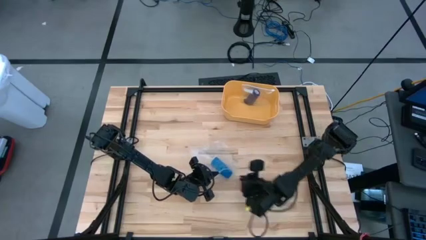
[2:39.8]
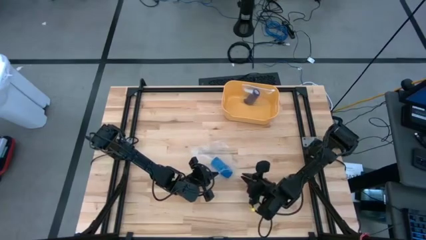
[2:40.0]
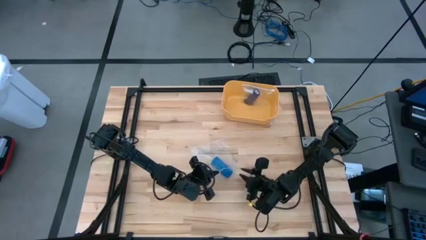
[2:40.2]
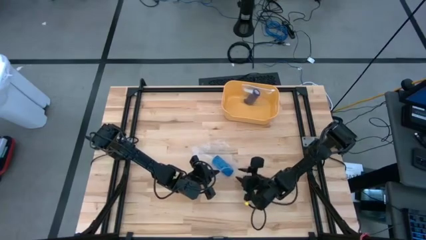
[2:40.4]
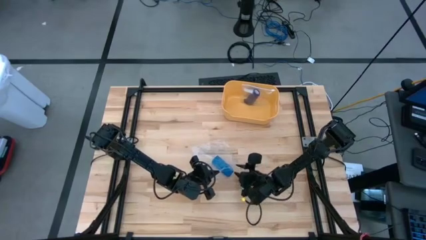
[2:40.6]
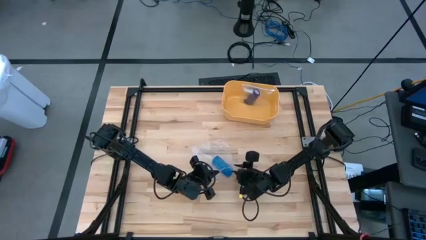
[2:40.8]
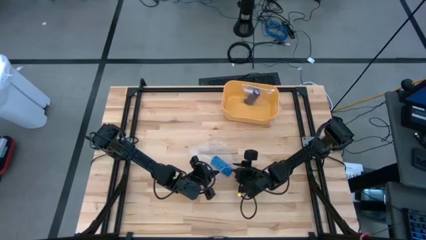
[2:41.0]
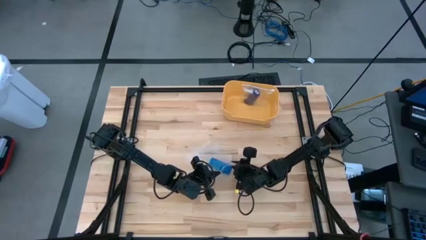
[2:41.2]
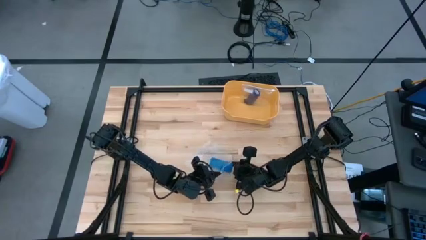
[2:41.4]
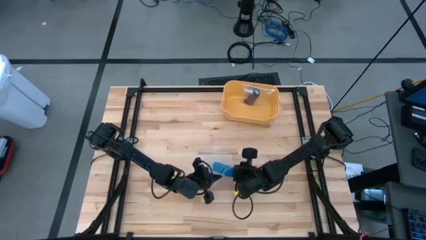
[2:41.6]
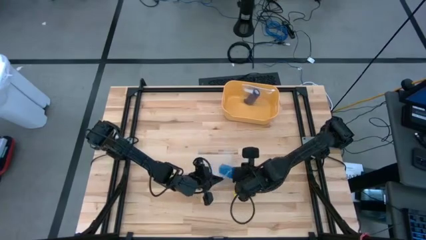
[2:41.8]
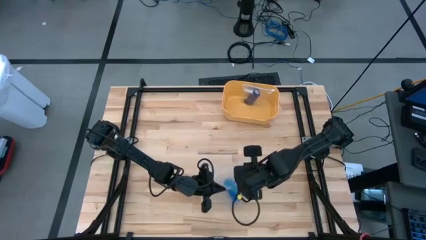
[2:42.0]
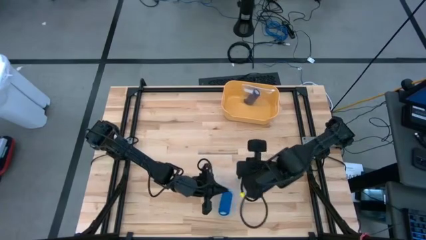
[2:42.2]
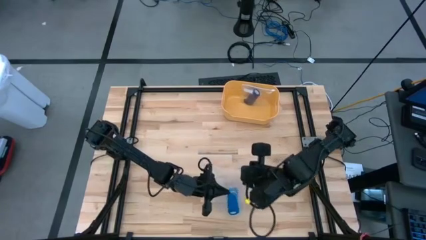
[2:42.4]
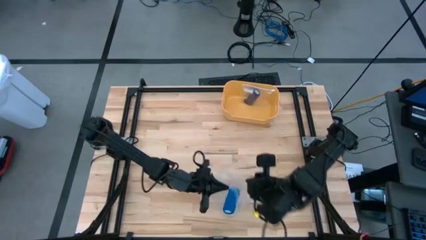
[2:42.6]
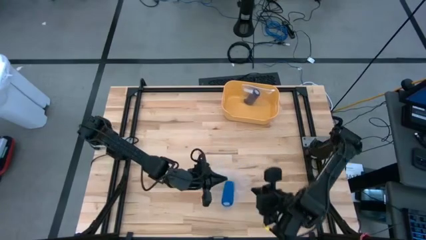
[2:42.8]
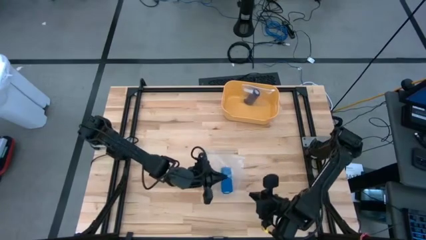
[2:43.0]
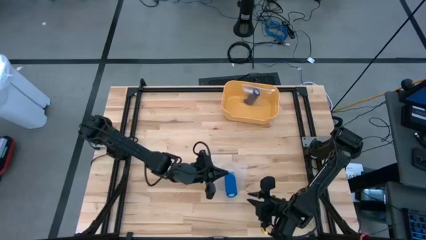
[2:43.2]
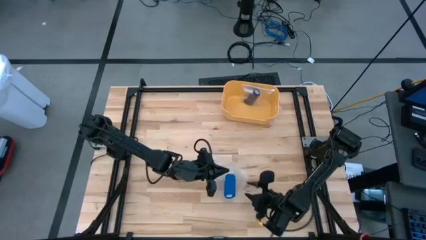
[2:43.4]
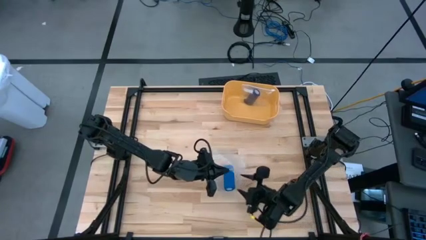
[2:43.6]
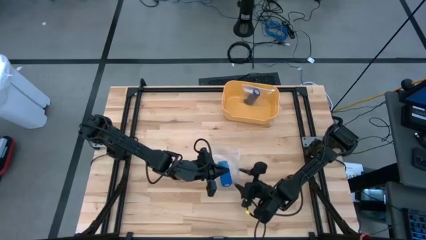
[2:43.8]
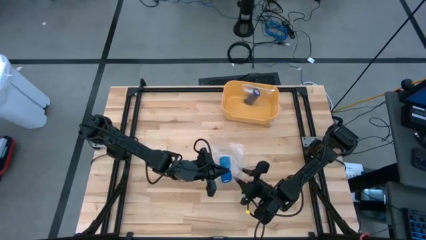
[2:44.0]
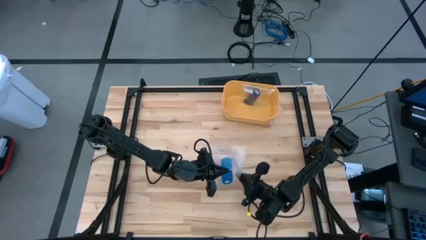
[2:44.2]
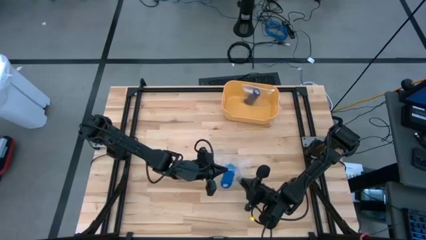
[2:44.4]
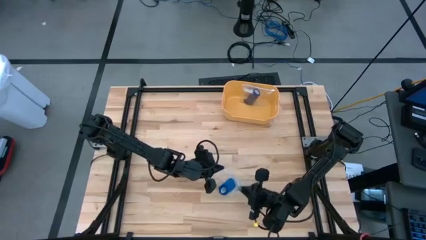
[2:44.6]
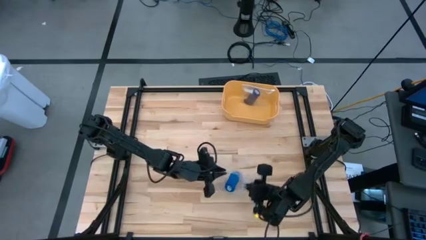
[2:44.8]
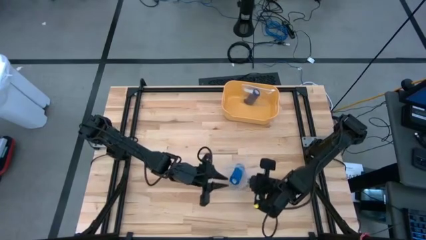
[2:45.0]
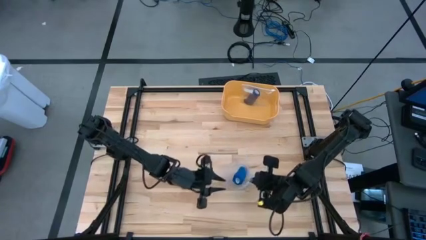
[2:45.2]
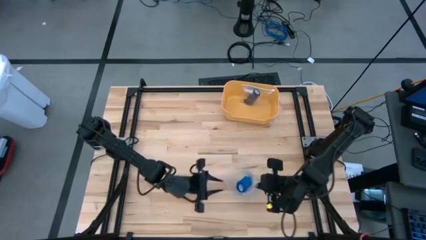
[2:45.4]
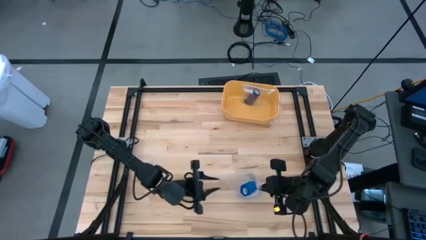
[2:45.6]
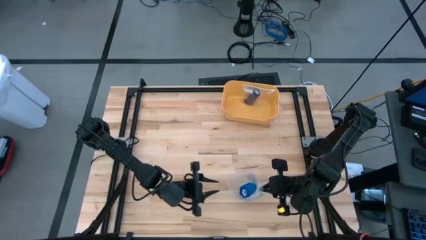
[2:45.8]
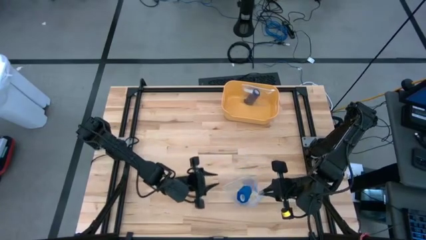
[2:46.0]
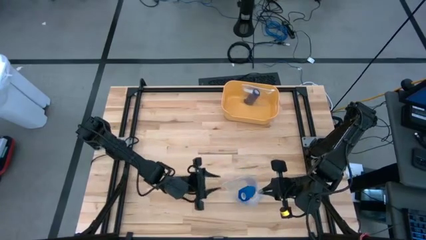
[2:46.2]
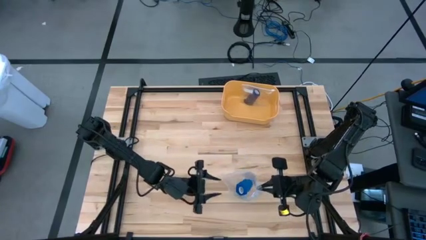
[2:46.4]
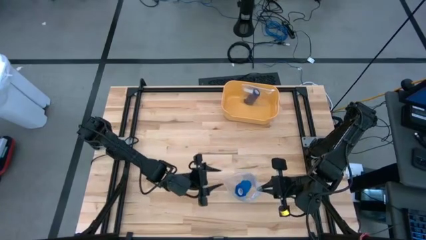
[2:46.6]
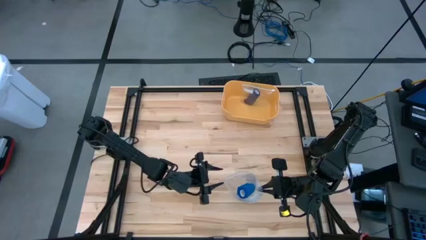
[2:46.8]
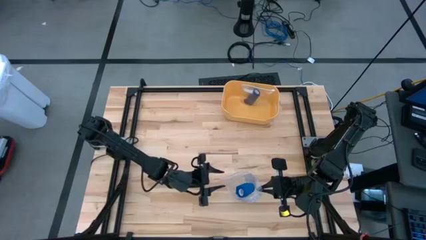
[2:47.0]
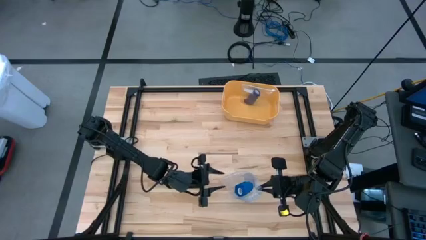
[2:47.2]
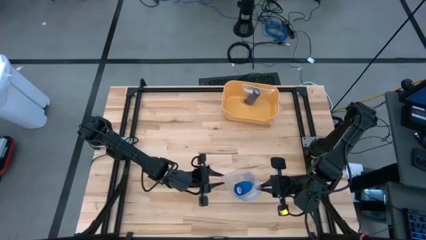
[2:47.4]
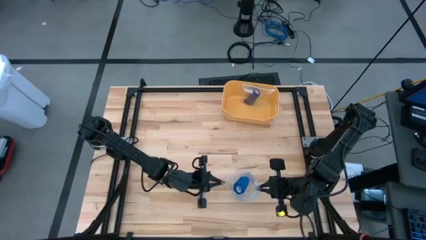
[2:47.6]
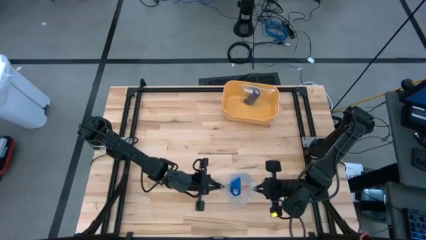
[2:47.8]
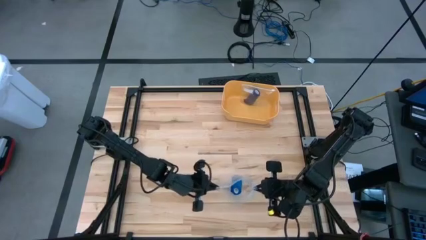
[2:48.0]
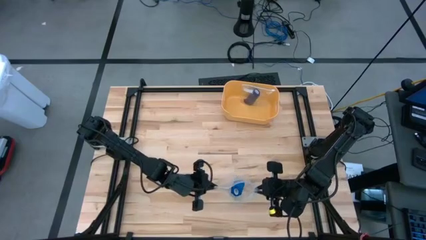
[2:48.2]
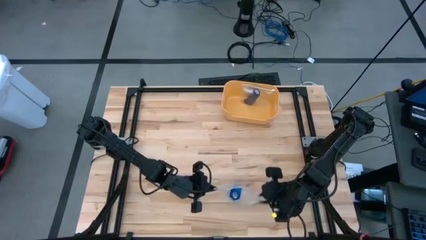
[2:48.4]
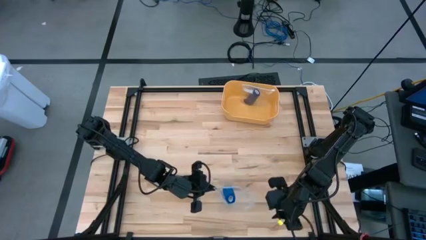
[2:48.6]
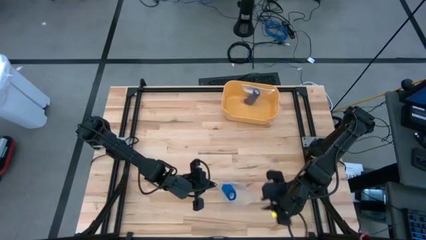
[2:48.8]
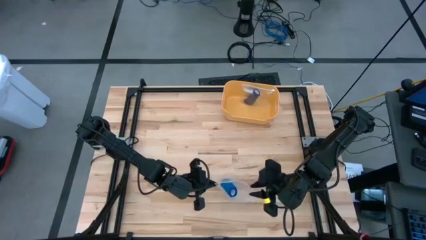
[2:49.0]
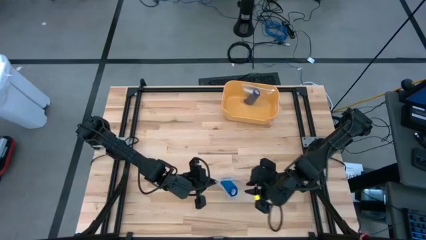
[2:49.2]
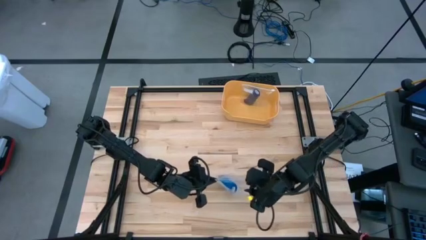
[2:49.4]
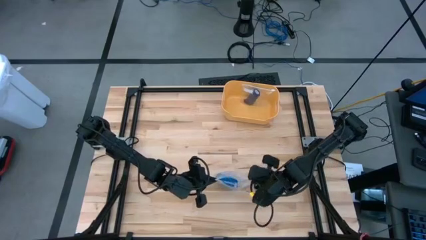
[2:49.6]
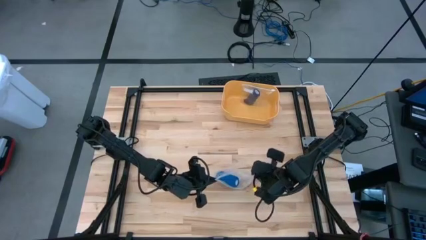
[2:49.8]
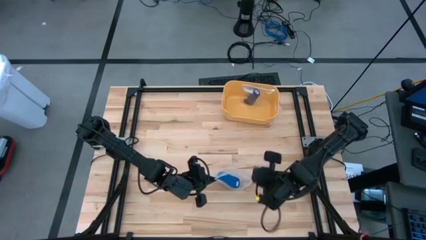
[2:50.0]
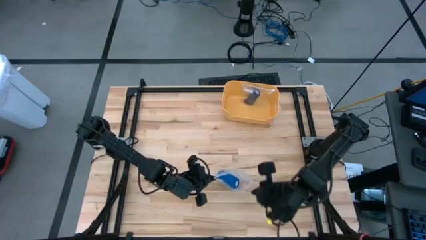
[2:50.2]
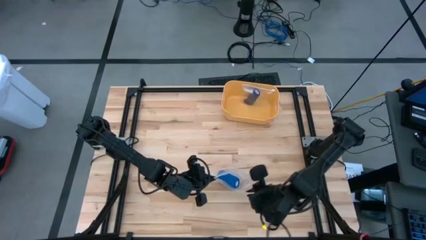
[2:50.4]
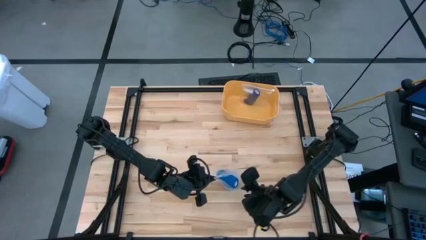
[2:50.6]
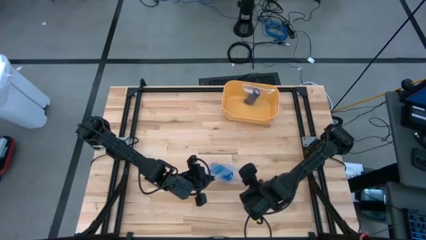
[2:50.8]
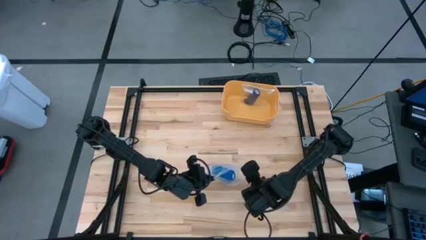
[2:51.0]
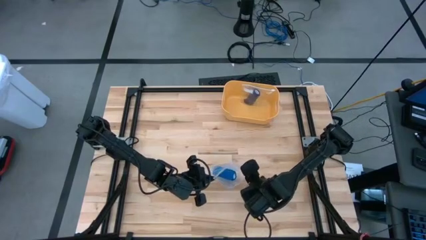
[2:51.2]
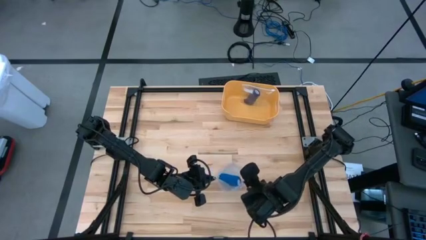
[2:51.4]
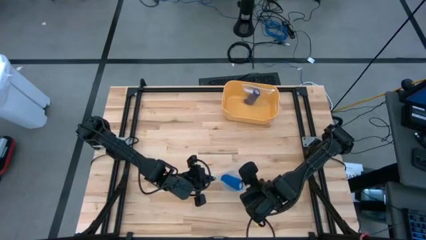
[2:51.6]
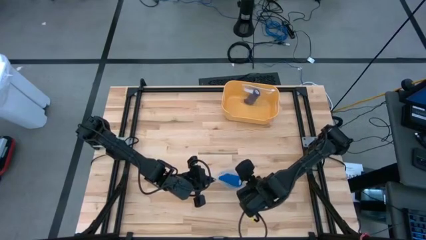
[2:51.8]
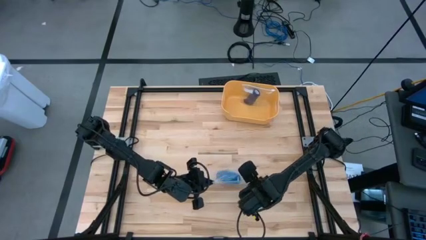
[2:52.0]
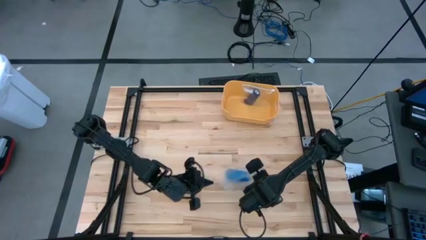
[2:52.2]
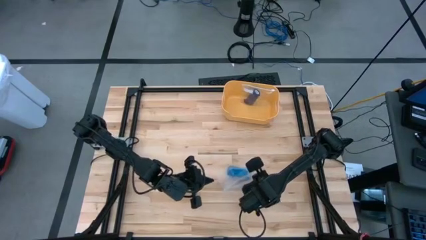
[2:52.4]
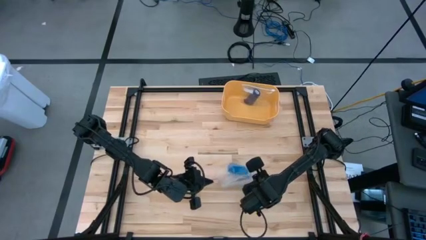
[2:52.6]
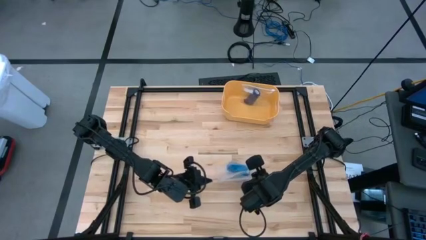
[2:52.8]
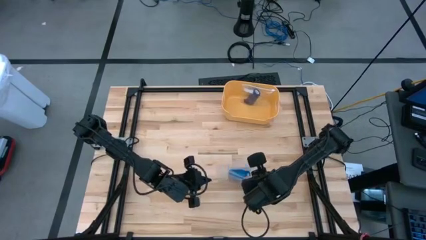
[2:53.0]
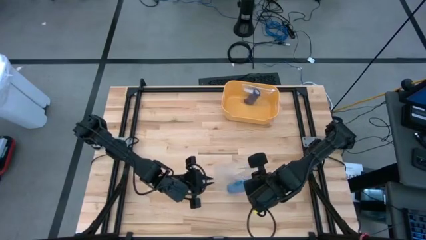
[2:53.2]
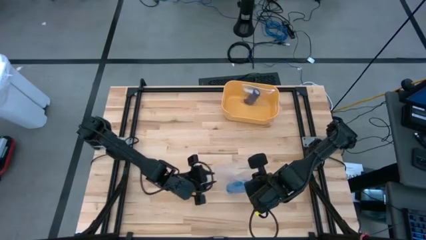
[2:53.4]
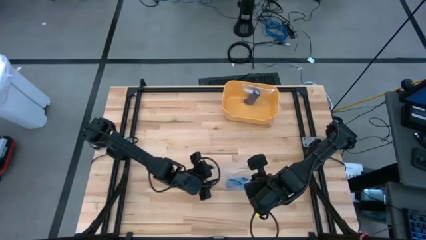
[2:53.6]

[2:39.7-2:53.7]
Task: Roll bandage
Close the transparent zip bag

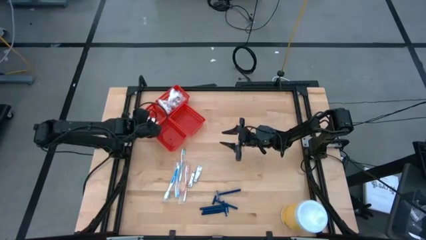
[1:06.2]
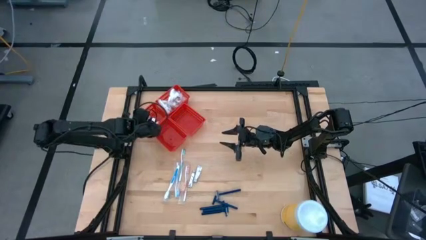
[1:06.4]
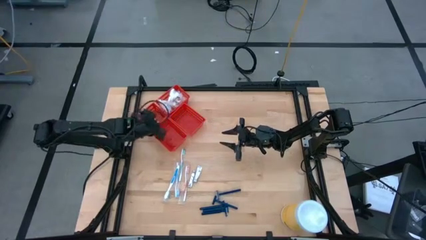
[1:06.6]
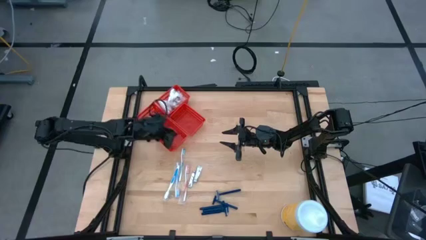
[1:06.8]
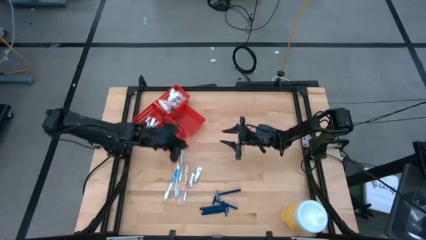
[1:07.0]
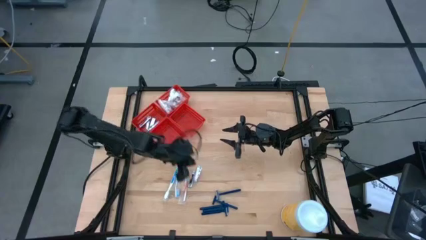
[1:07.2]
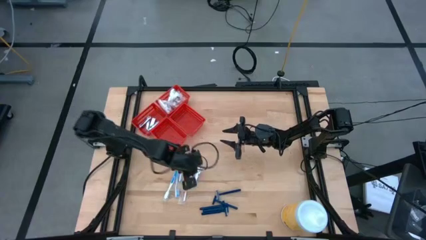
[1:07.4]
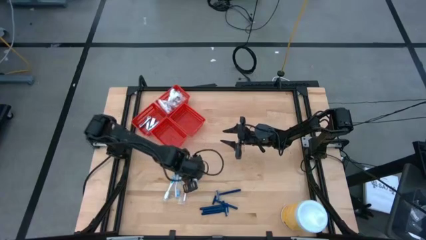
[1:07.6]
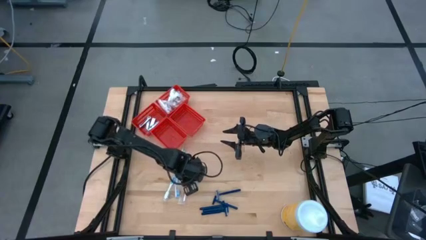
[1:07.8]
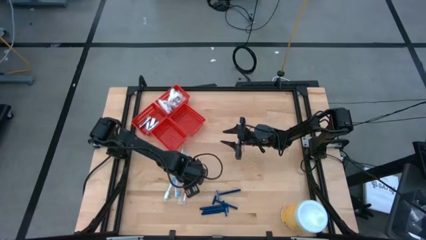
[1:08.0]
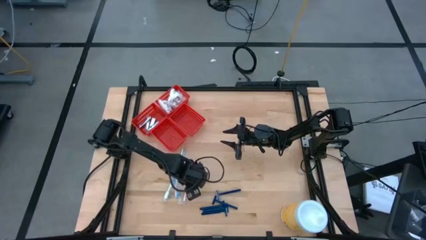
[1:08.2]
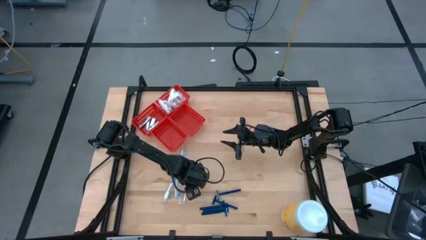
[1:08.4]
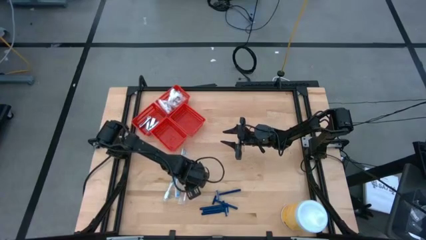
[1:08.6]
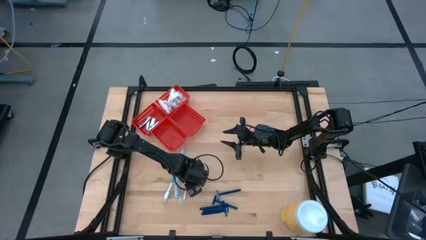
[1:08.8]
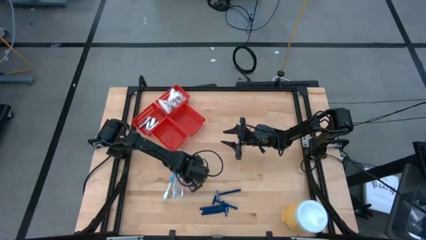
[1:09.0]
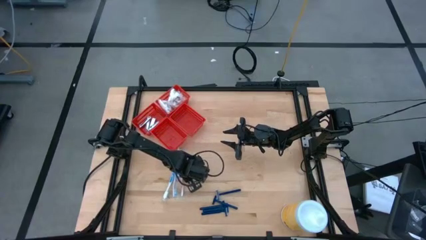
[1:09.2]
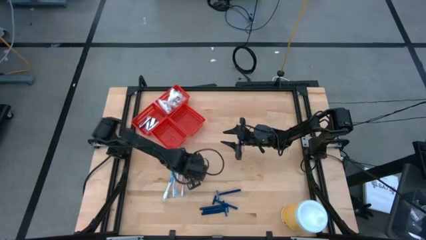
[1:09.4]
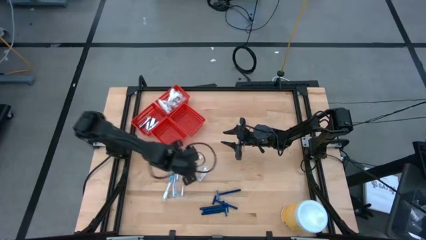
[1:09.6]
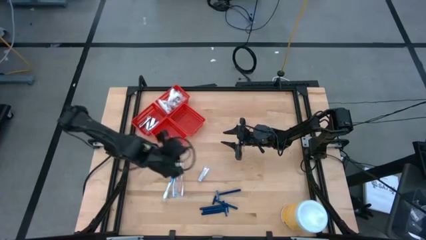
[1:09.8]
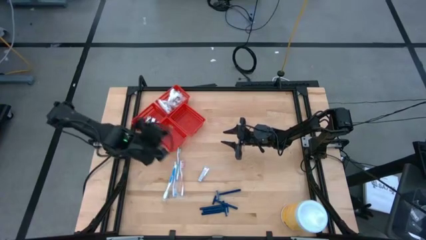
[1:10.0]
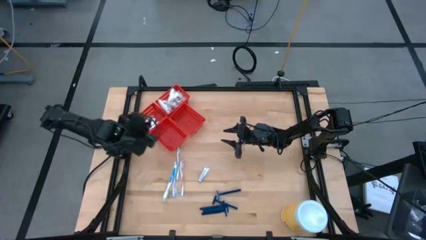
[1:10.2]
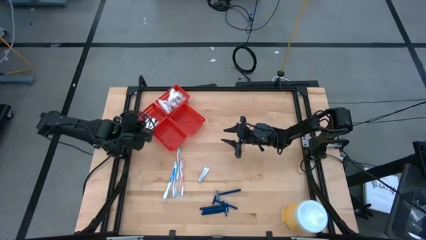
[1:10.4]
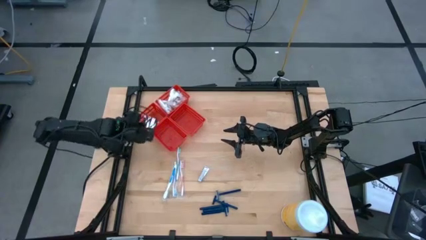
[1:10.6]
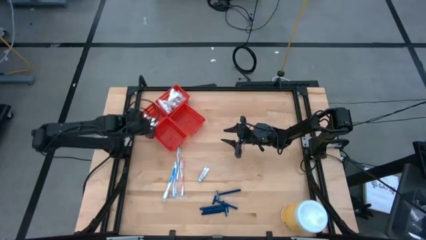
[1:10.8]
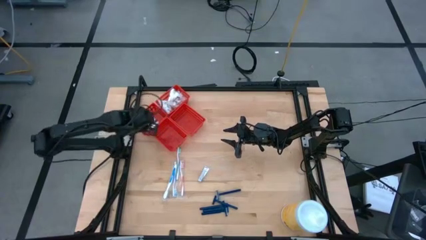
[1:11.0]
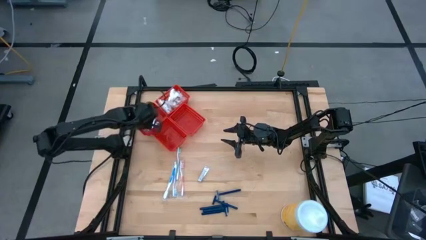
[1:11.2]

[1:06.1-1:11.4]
Task: Pick & Place Travel size toiletries
Put the left nail cutter into the hrizontal left red bin
